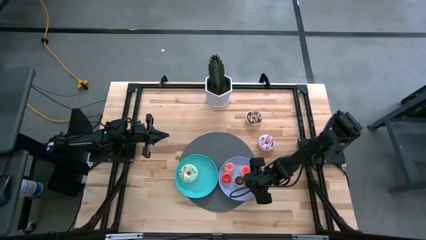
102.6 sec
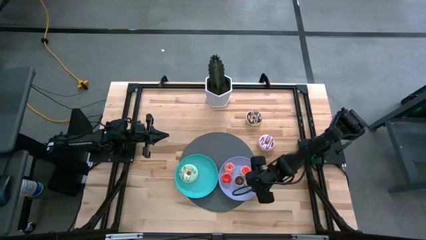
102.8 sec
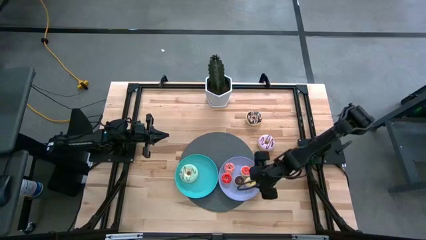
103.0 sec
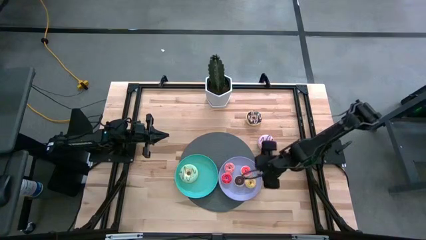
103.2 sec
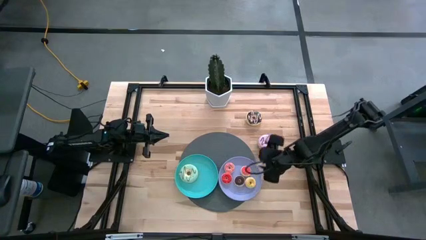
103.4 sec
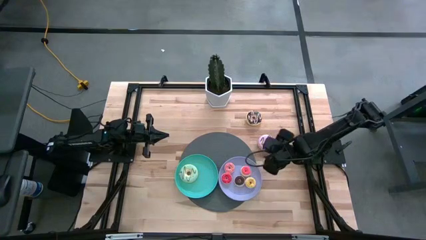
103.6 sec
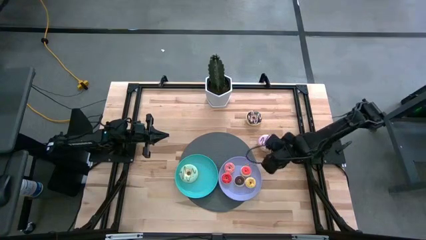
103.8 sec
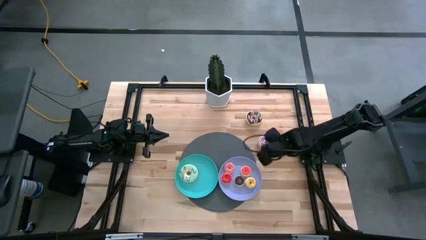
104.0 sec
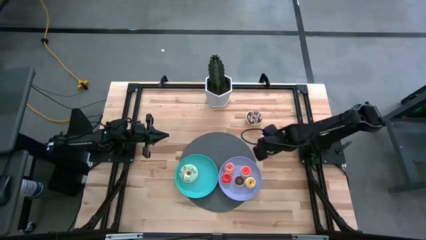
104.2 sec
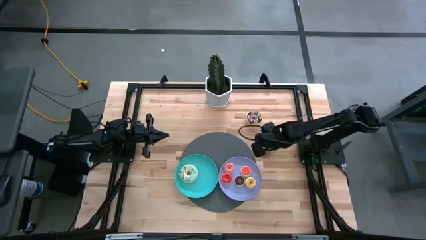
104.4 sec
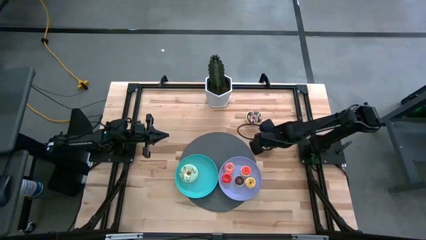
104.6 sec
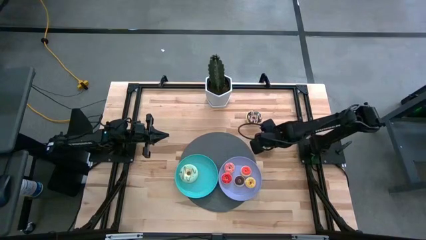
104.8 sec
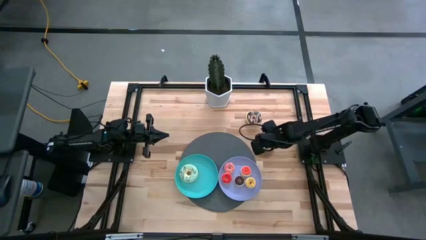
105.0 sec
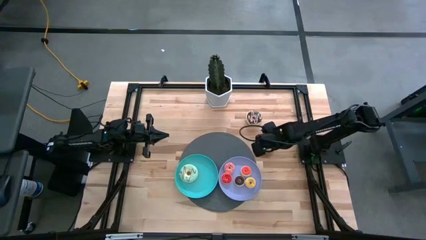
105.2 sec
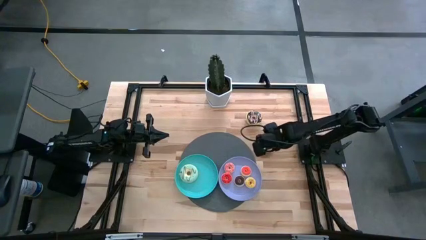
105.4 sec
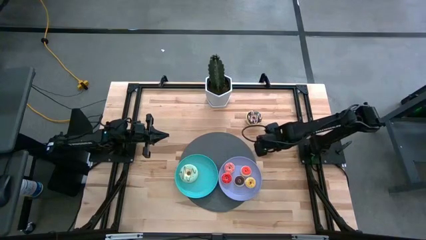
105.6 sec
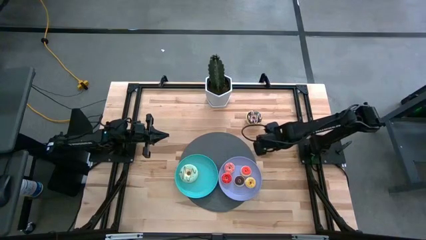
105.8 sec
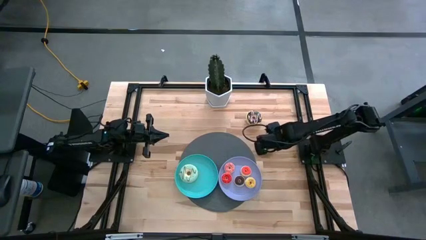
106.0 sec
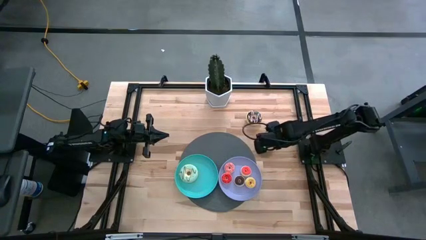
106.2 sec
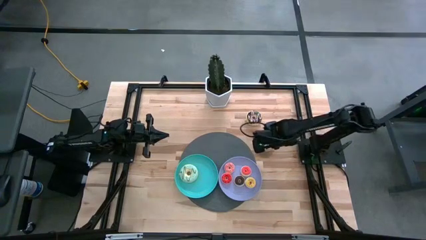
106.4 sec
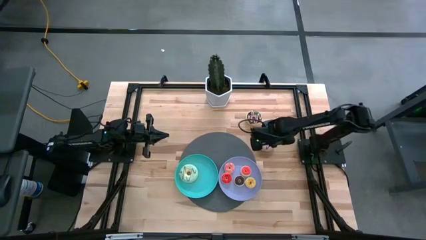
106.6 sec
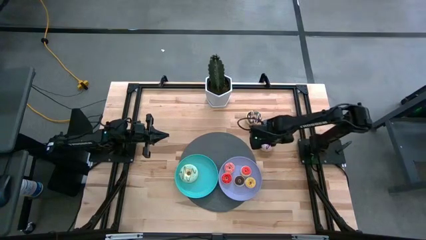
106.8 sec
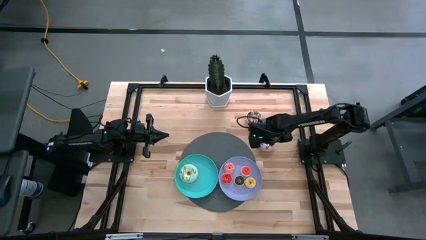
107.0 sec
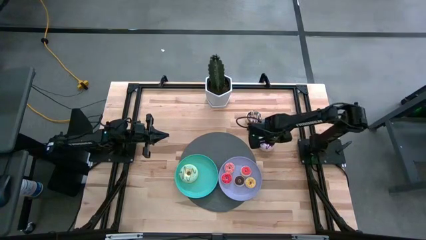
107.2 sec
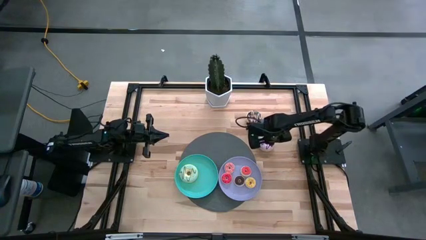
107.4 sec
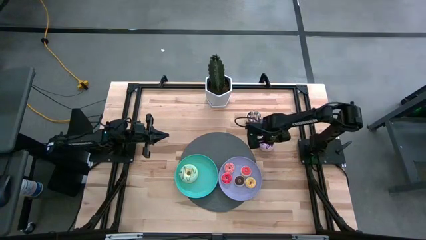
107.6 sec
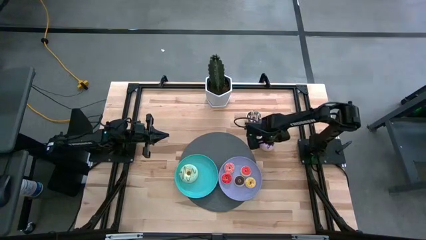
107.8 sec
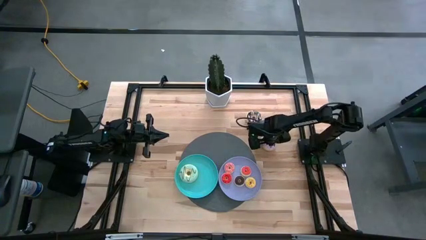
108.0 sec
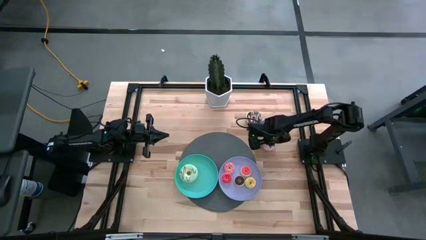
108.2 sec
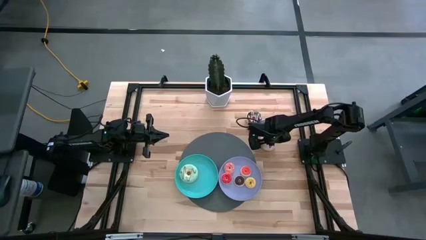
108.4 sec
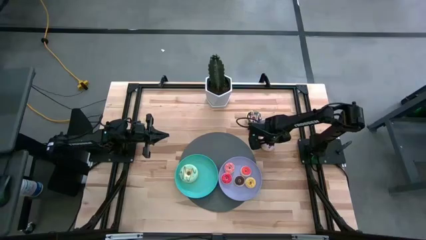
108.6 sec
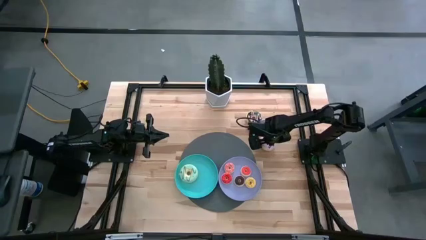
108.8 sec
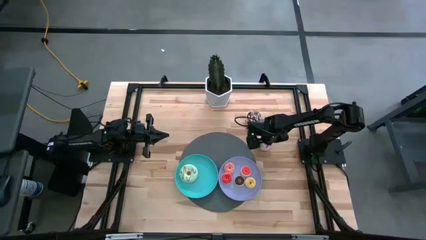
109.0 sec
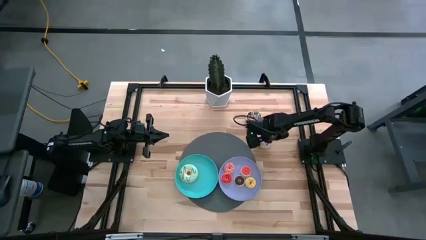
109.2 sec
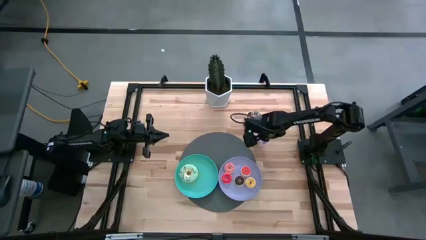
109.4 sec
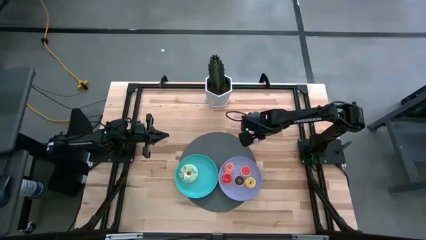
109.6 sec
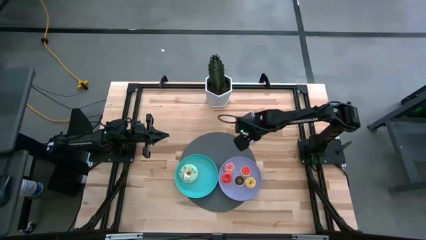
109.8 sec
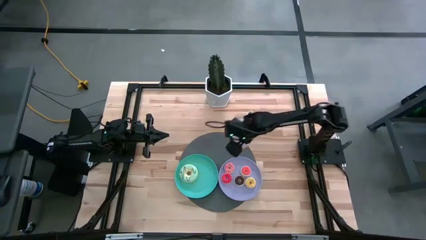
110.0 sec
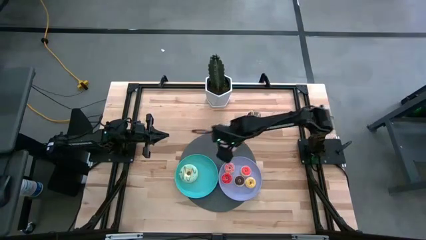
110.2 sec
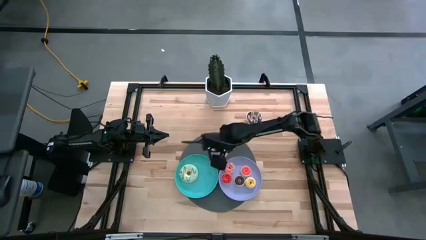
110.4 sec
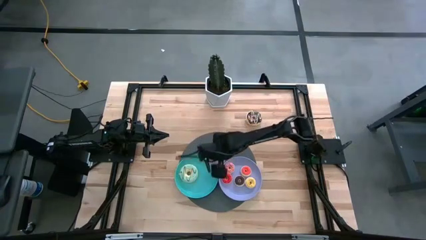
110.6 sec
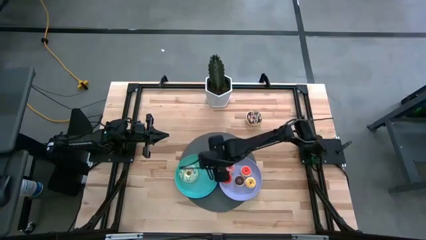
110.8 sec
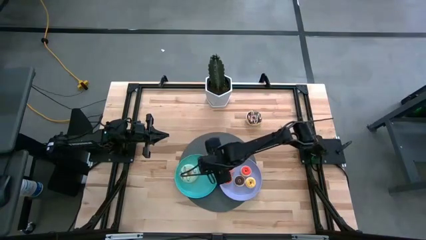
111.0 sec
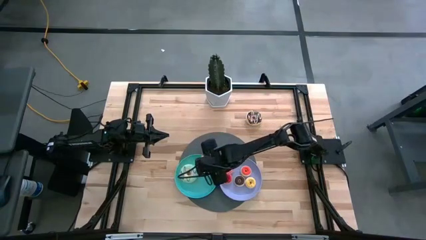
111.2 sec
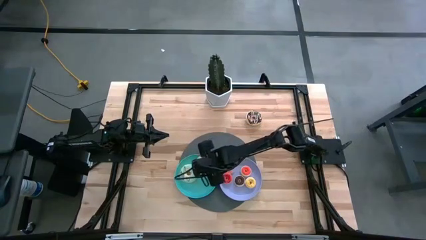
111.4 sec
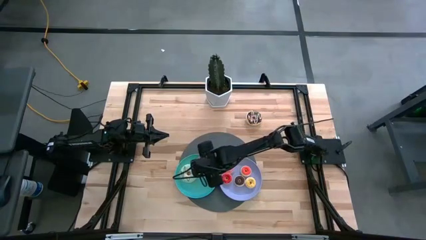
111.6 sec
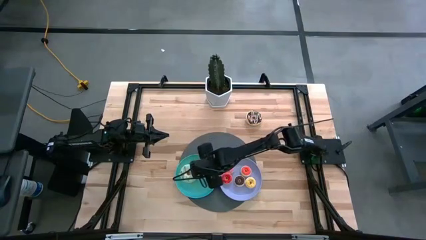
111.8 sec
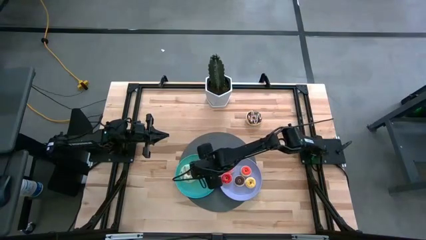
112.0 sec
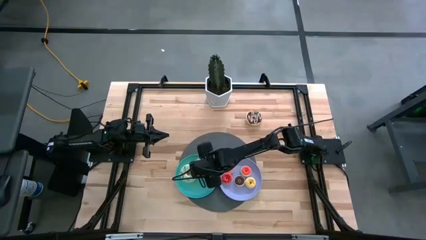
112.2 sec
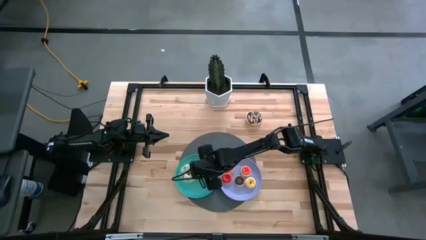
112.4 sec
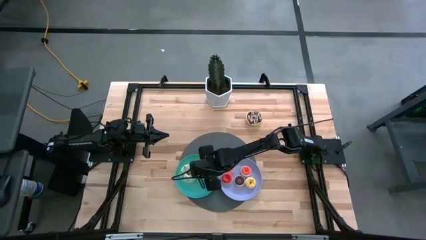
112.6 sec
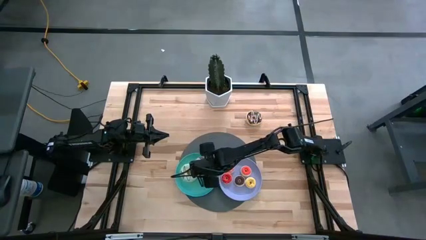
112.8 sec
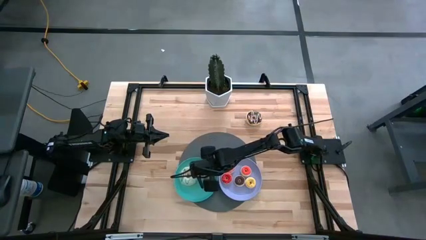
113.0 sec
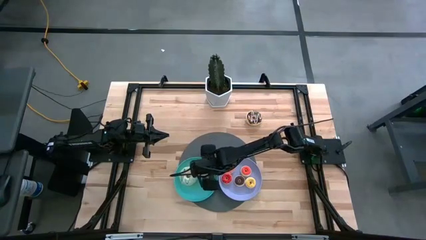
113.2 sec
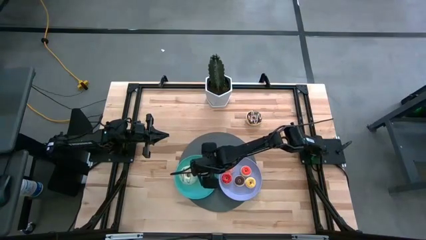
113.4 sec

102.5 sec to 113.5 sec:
Task: Pick & Place donuts
Put the big purple donut on the green plate

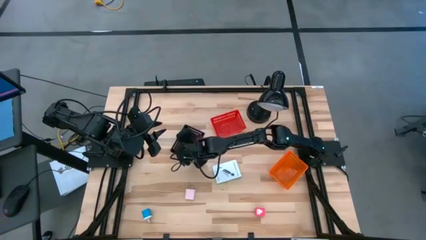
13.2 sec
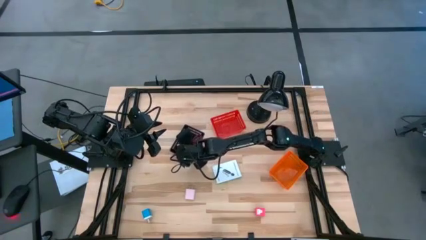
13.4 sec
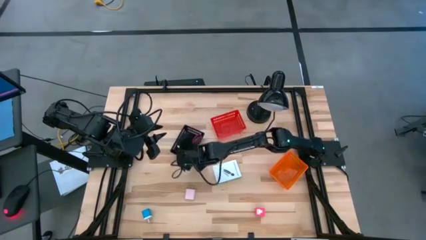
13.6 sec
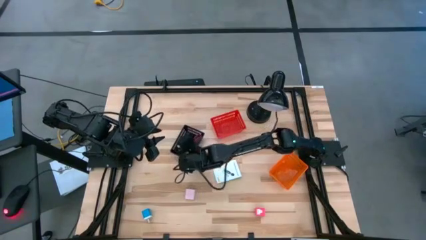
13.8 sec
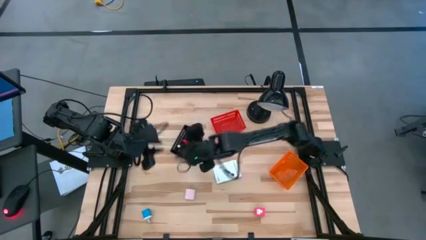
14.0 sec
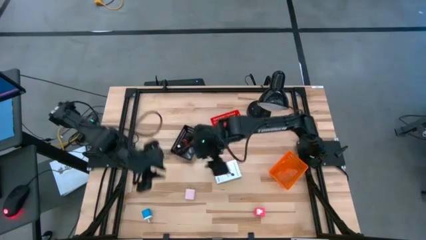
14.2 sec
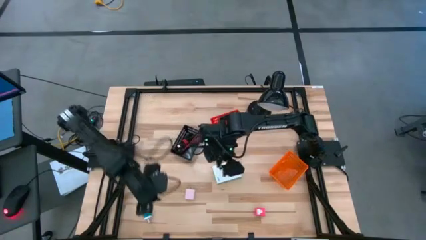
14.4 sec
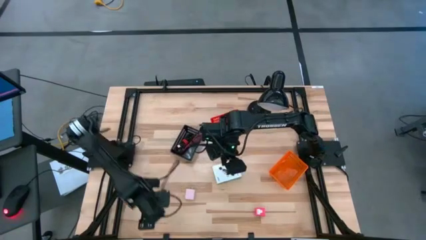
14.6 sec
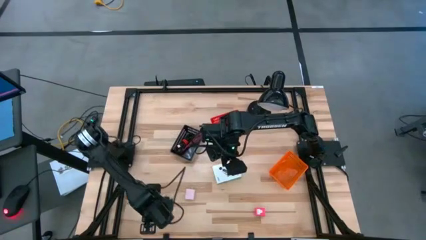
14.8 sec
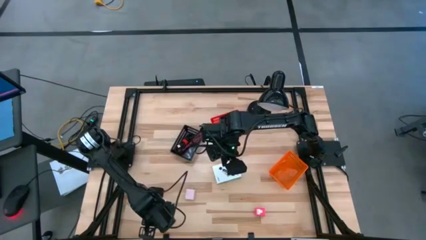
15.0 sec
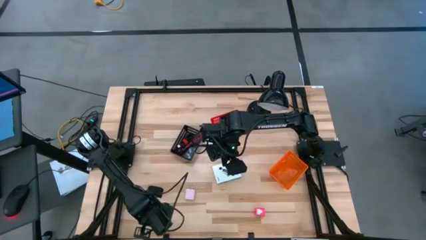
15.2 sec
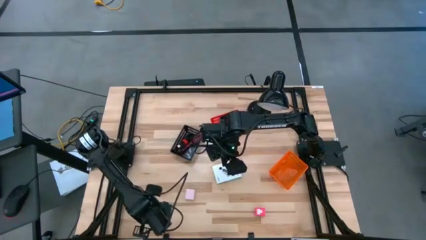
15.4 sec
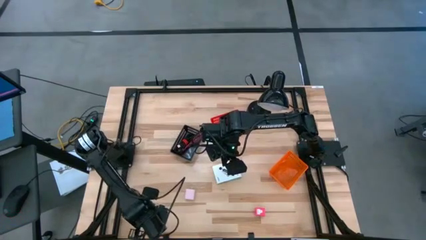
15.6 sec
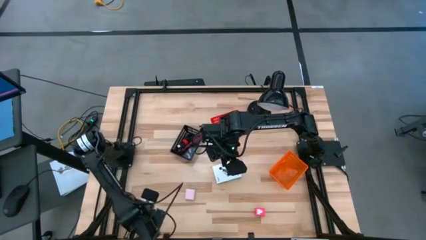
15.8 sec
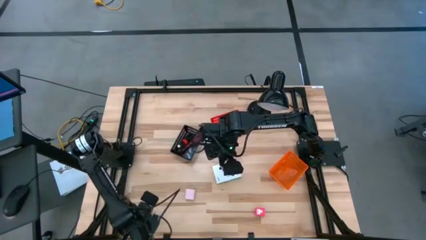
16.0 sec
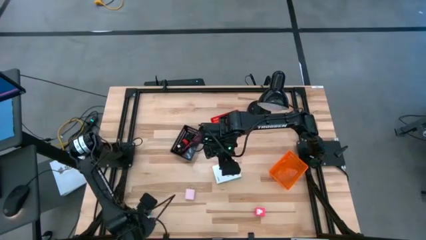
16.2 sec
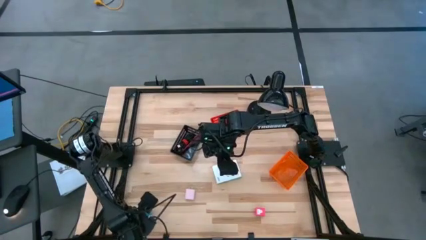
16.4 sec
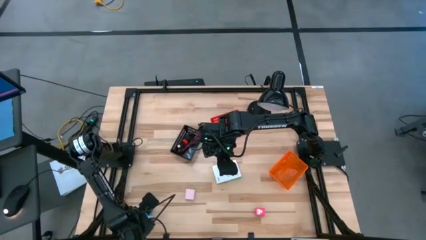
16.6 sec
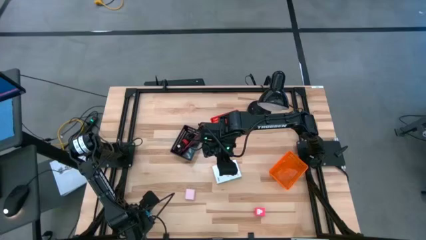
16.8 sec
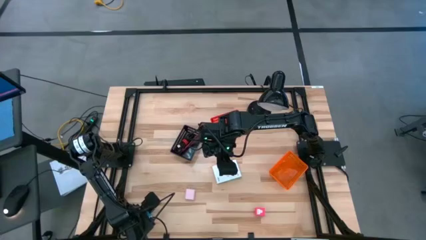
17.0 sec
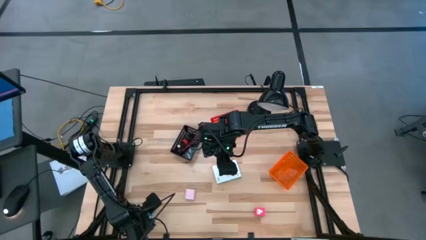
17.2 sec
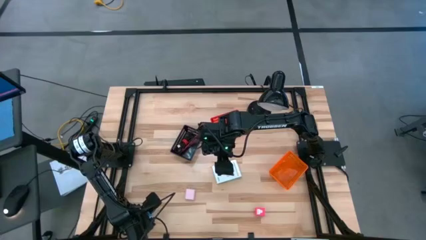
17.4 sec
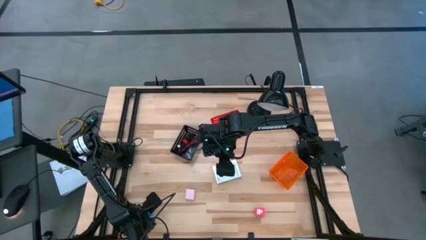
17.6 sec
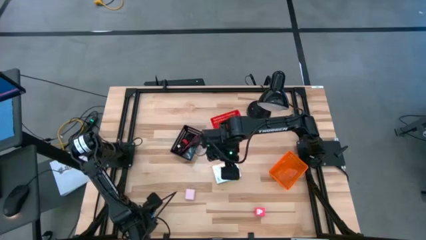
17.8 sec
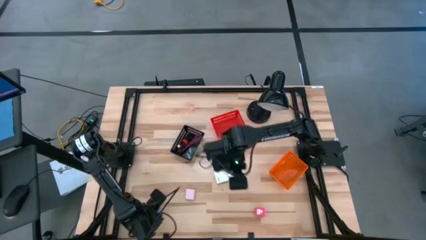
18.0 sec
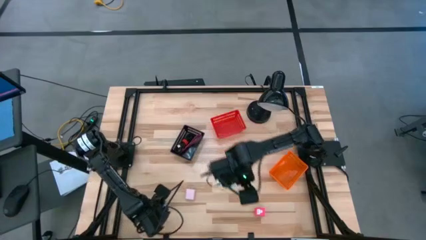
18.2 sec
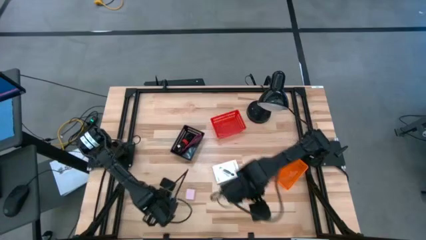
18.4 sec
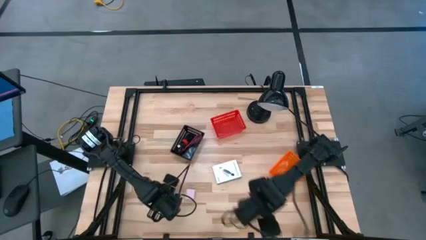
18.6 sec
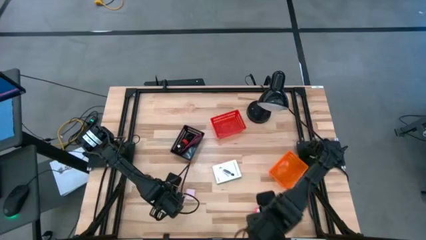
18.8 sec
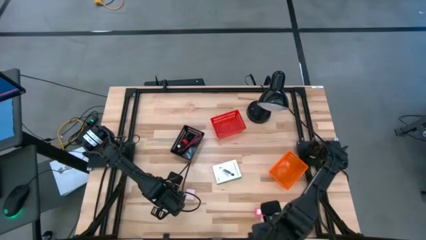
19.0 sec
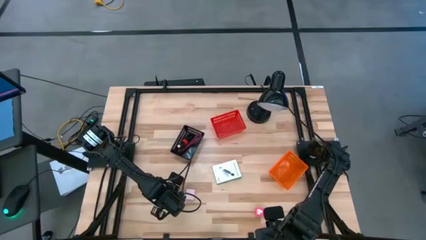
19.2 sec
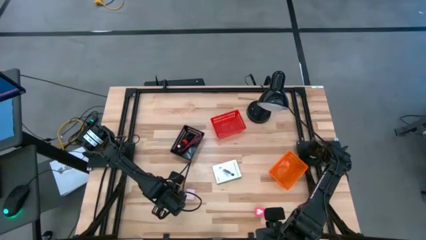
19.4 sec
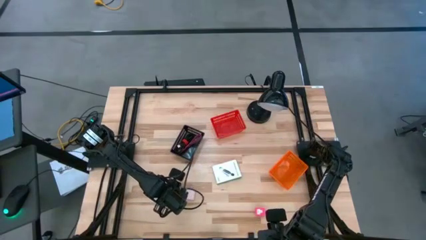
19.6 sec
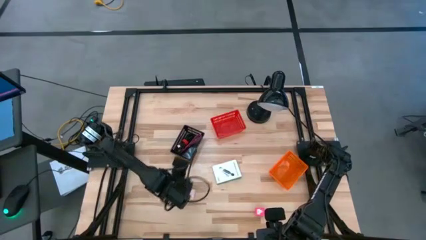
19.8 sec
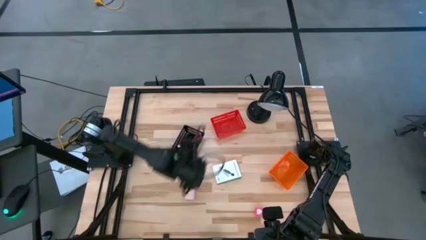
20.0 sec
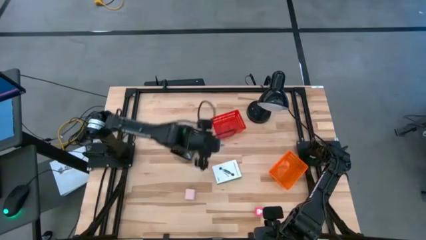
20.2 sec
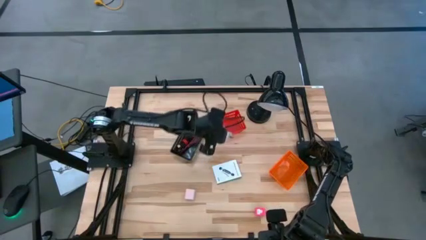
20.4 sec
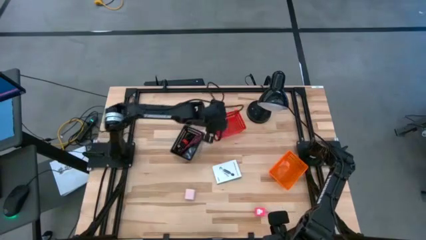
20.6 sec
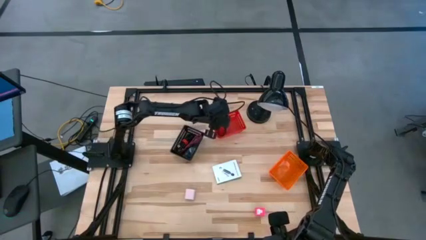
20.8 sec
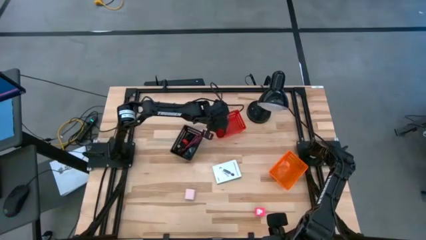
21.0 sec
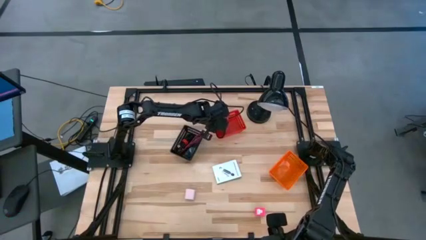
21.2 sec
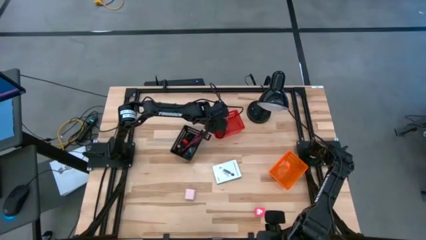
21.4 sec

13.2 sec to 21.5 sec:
Task: Pick and place items into bin
Put the blue charger adapter into the red bin
